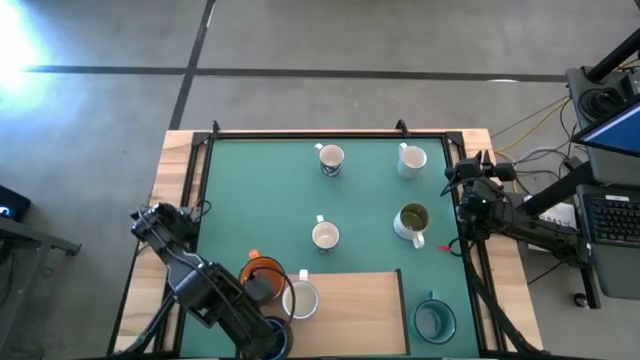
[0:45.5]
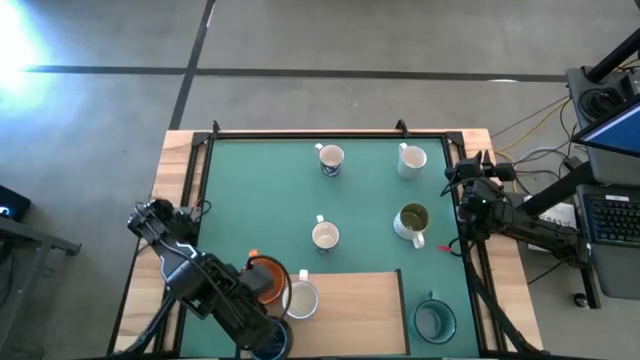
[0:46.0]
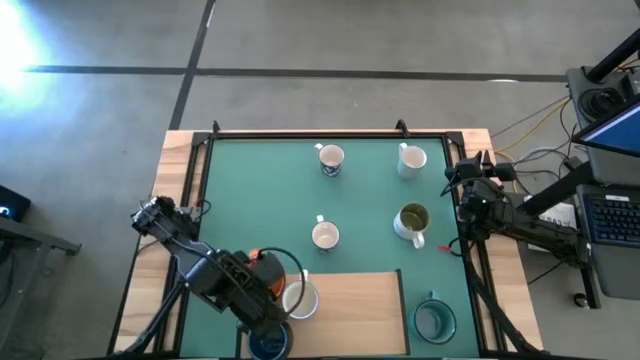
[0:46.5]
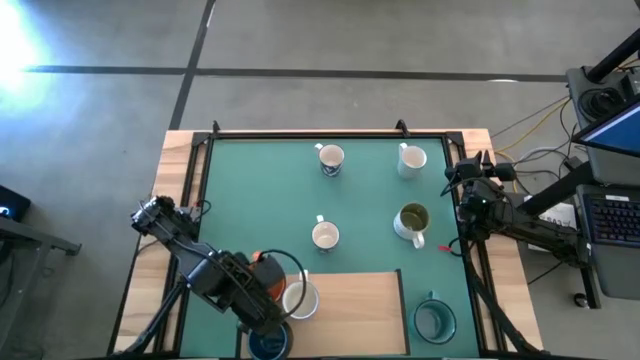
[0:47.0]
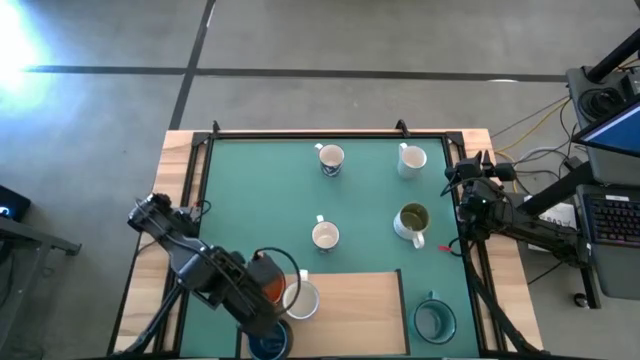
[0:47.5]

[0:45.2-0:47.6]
Task: Place coffee mugs
Adjust the orange mug on the shelf

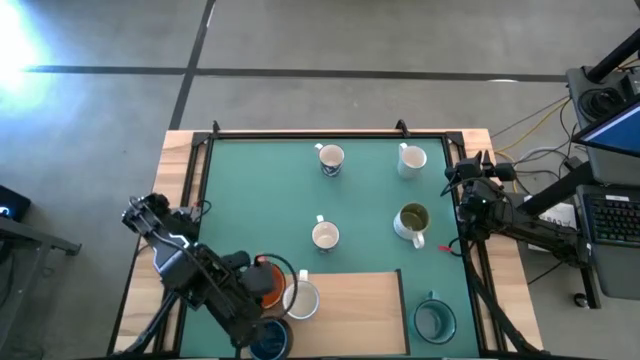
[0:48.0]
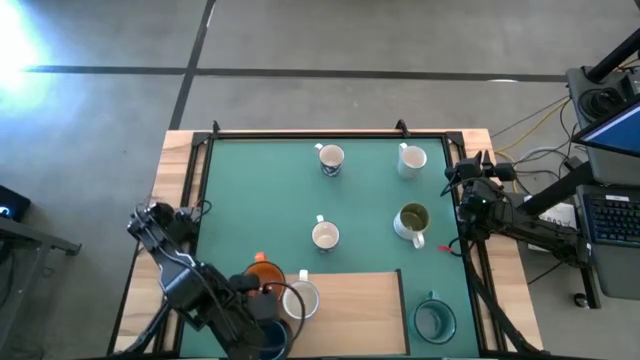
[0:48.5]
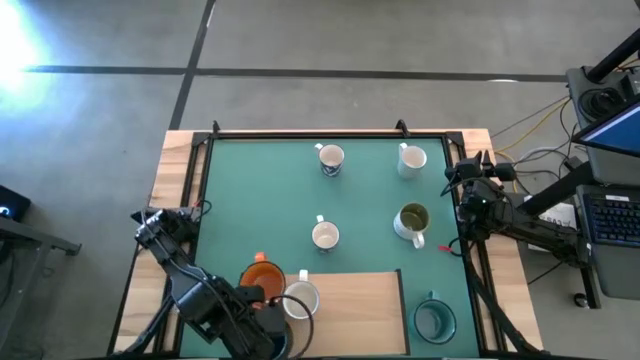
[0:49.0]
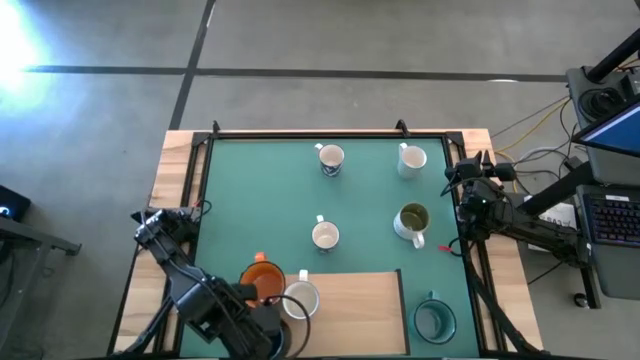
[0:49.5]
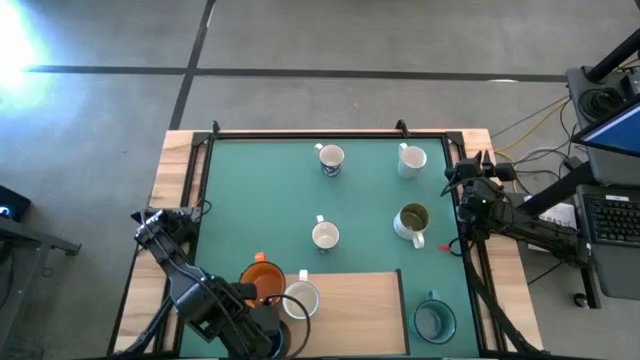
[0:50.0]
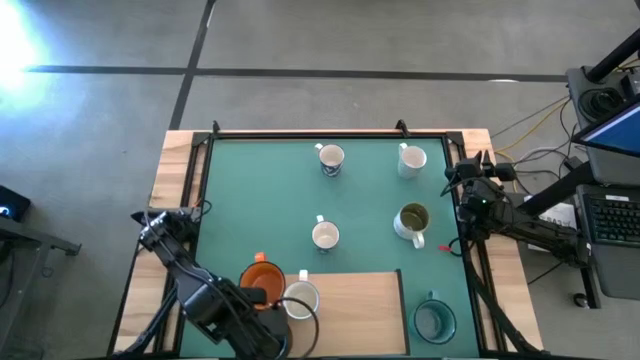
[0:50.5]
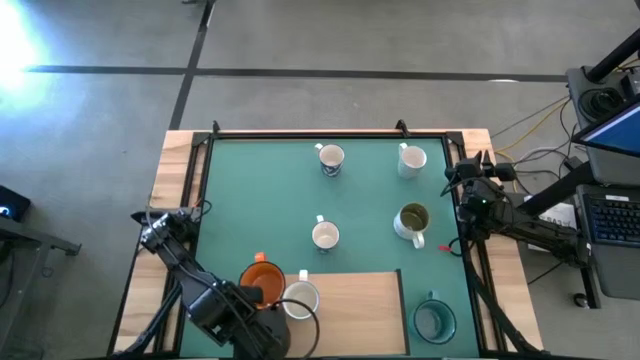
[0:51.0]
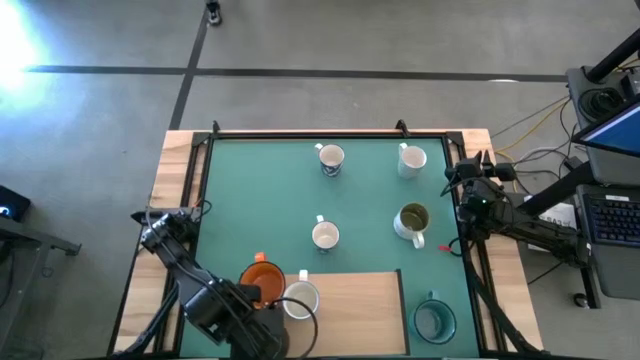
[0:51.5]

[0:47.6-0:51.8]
Adjust the black blue mug on the shelf

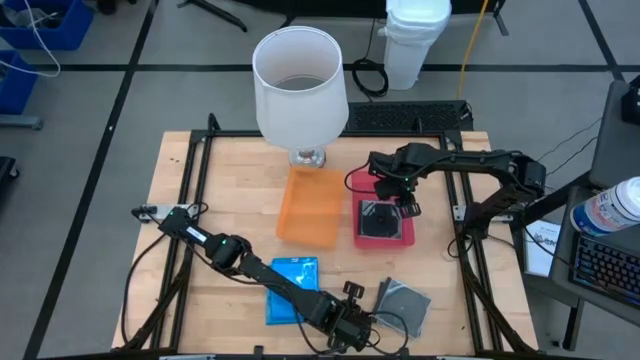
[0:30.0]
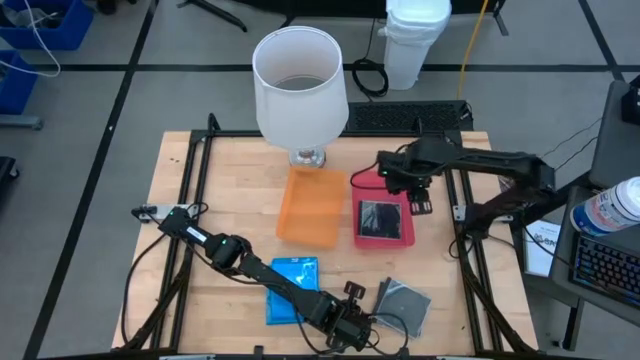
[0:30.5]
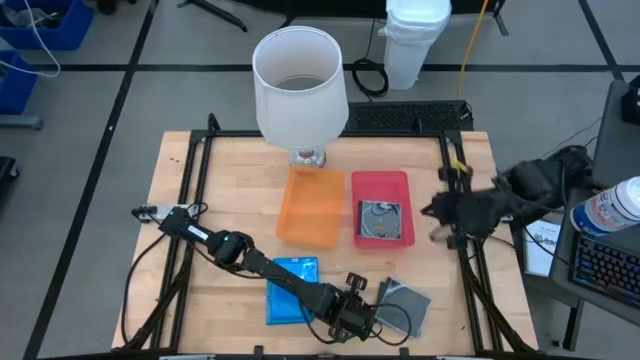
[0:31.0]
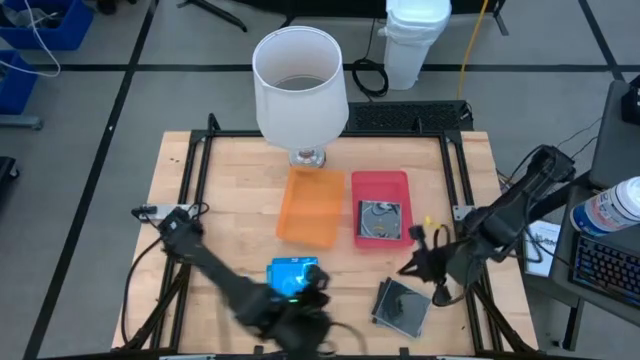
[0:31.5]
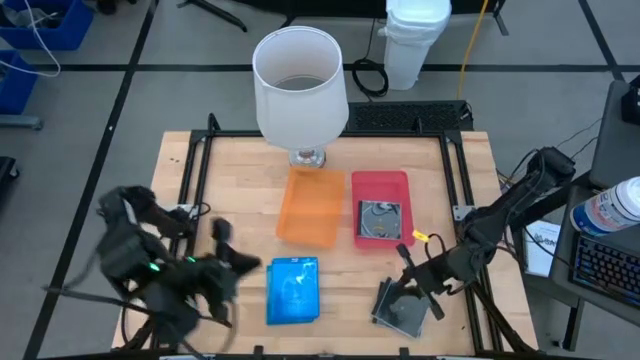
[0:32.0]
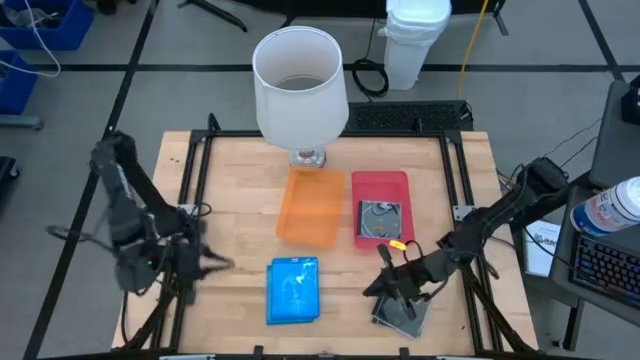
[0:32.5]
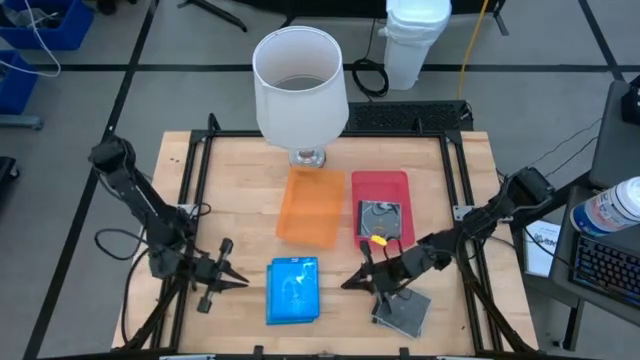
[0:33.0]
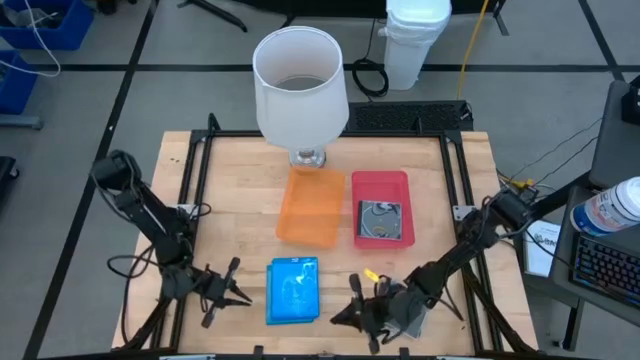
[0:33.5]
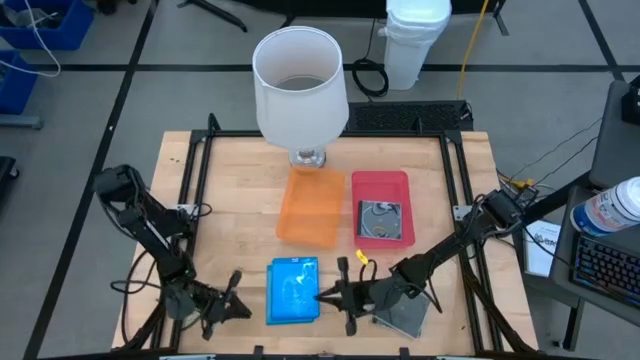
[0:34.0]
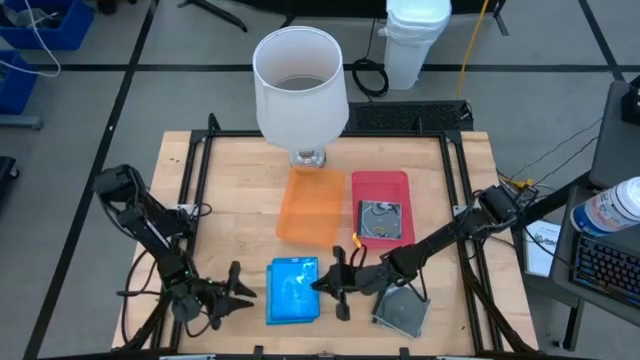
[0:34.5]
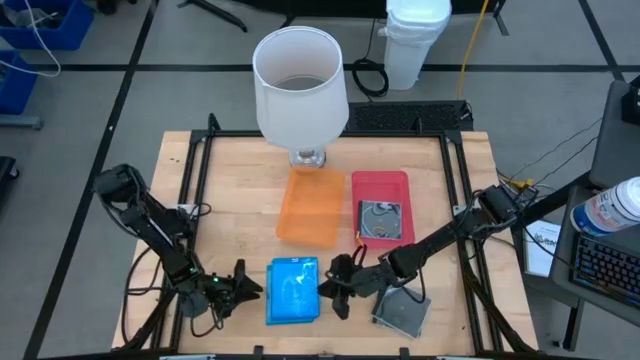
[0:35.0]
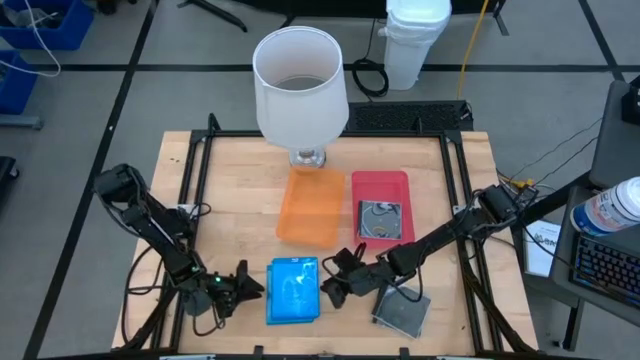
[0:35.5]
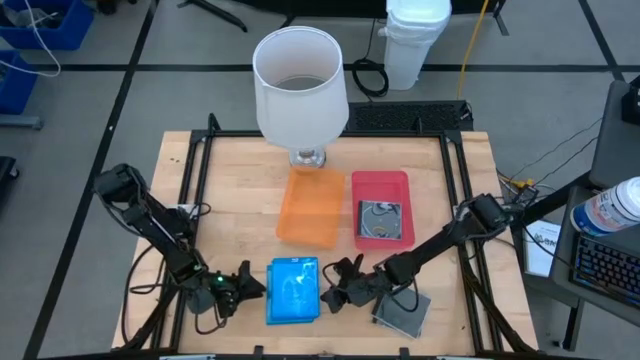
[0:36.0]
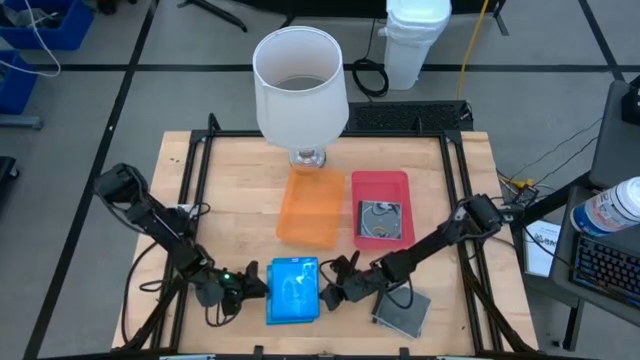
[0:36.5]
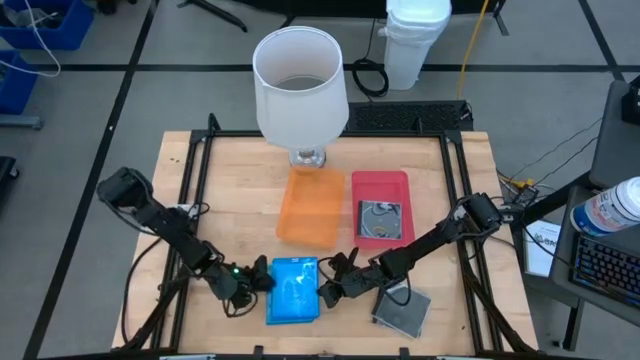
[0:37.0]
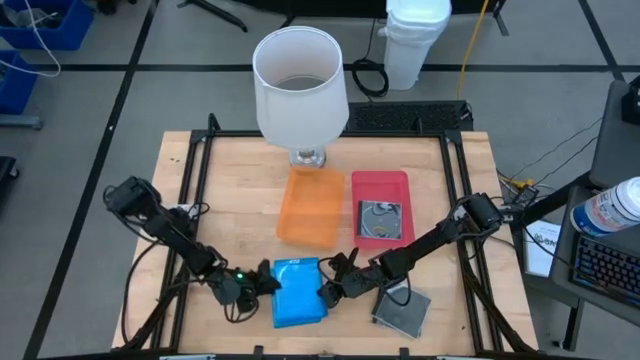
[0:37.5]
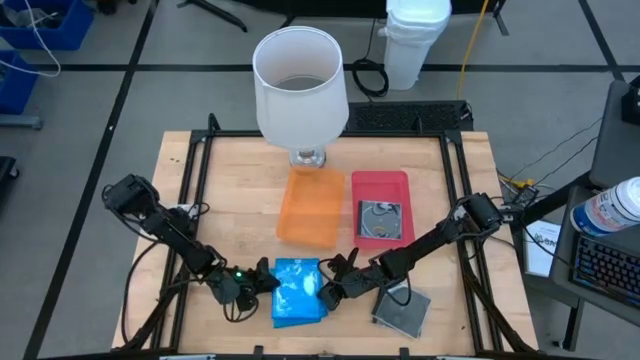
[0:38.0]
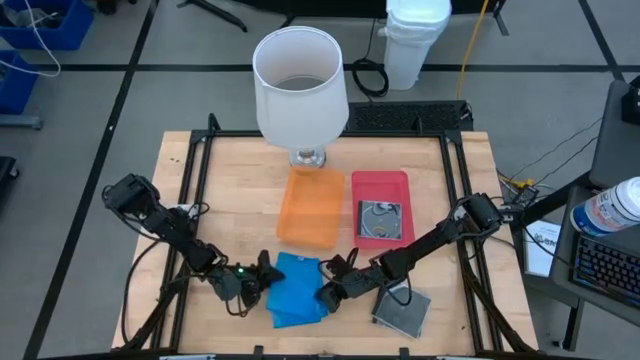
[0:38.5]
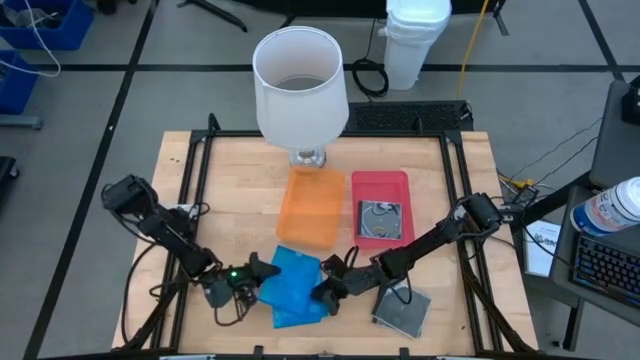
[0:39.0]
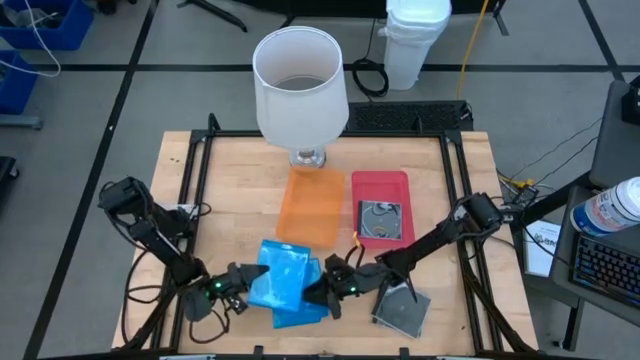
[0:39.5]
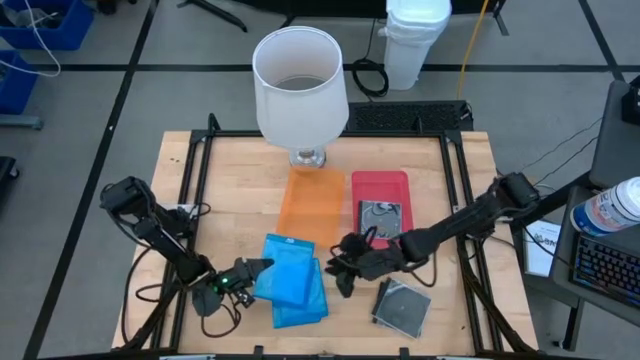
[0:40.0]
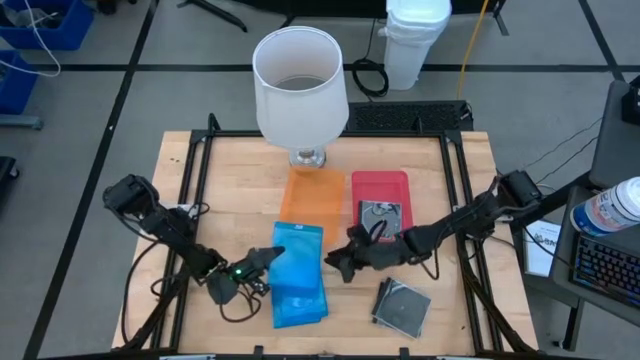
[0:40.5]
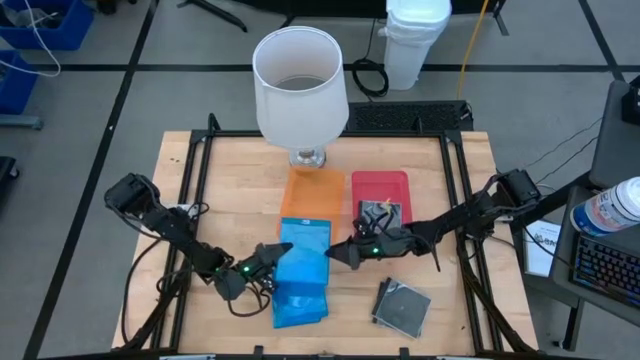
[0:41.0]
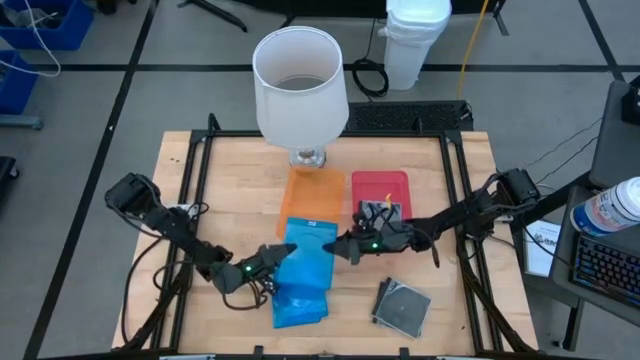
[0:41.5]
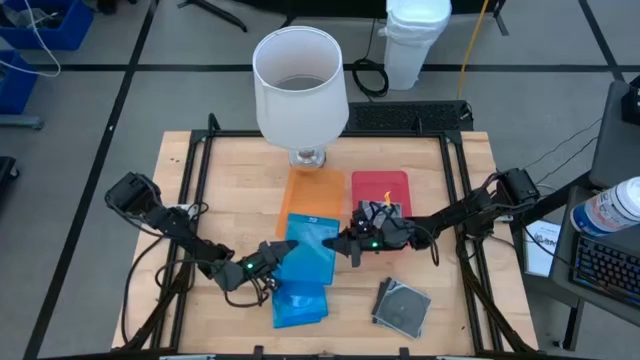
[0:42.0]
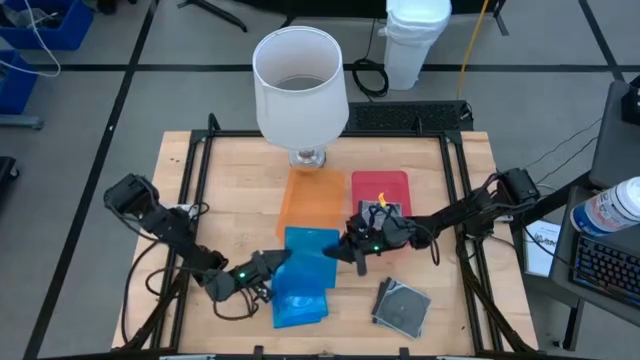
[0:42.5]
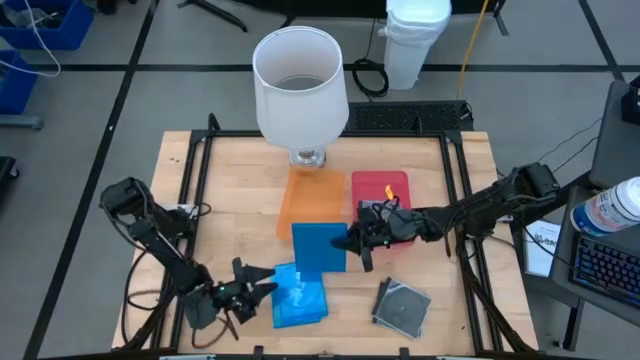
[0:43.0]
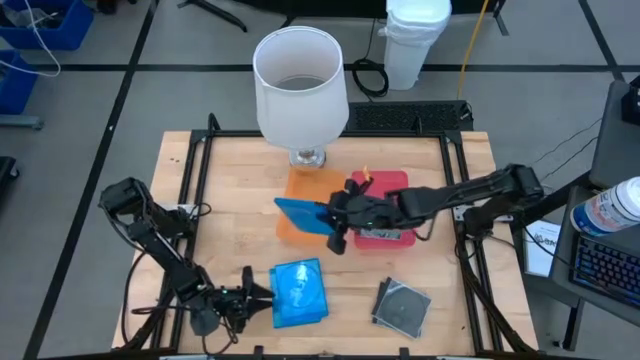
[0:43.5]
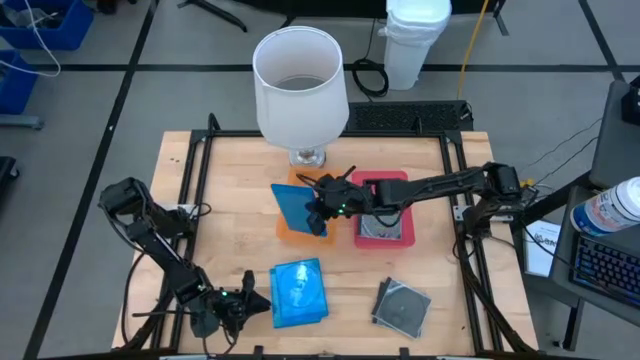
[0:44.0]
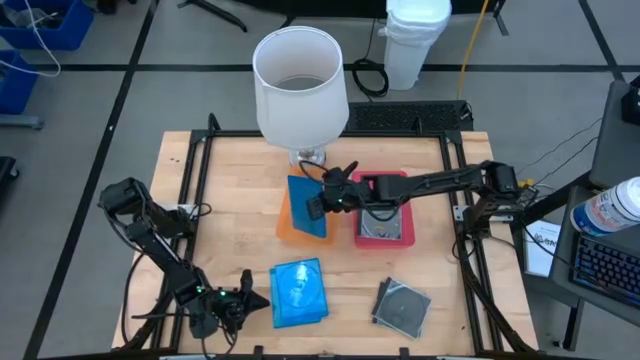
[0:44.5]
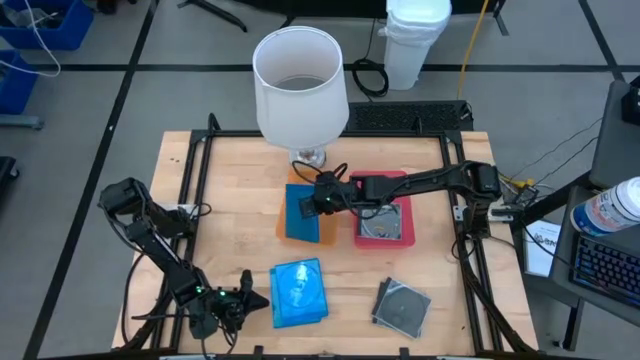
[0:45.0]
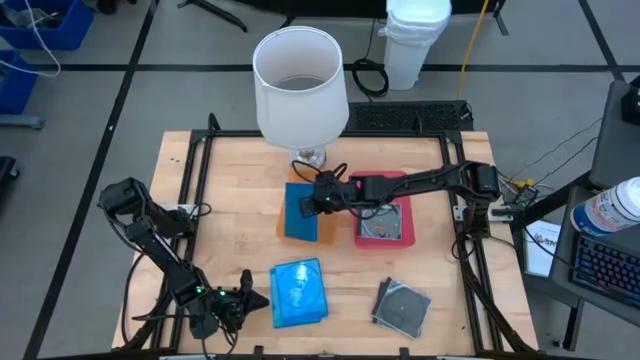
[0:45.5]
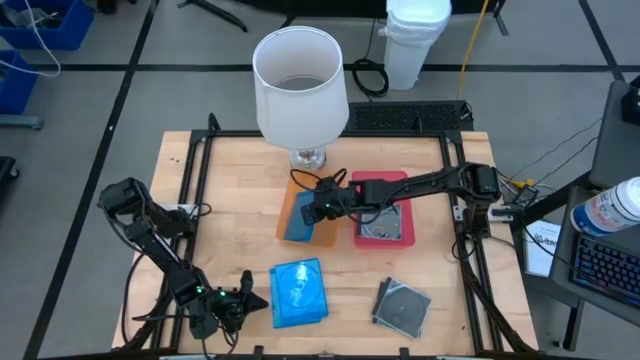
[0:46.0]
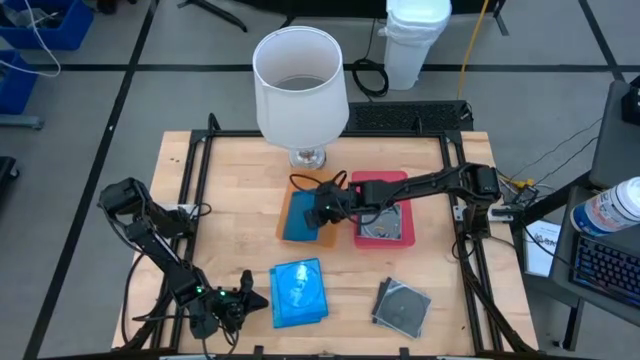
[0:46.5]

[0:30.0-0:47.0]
Task: Pick & place jewel cases by type
Put the blue CD case into the orange bin
